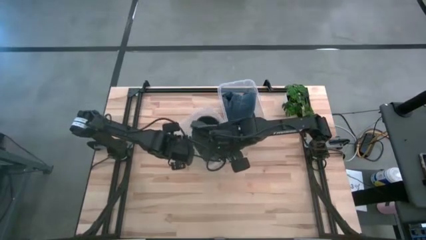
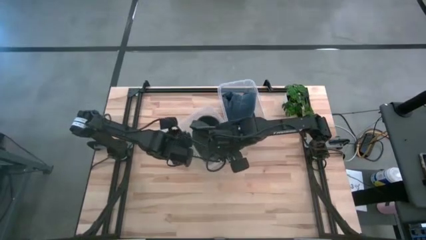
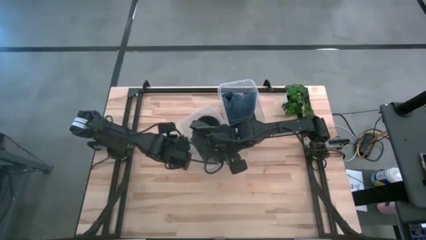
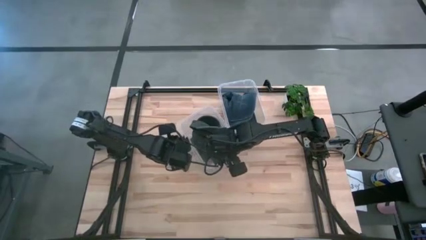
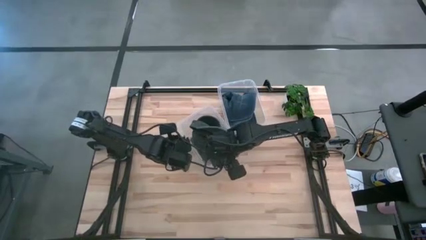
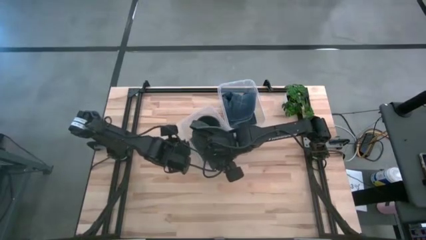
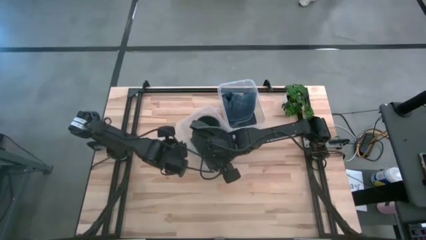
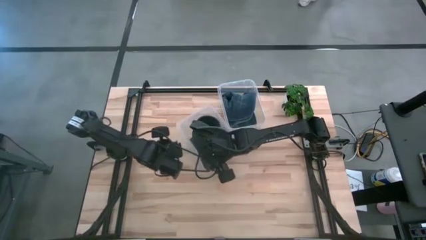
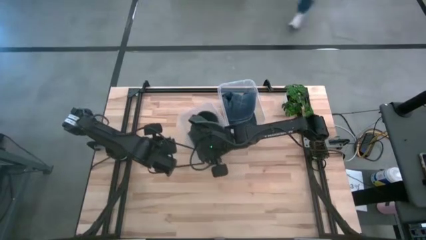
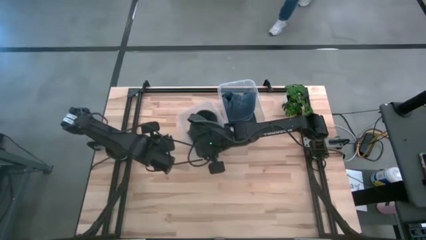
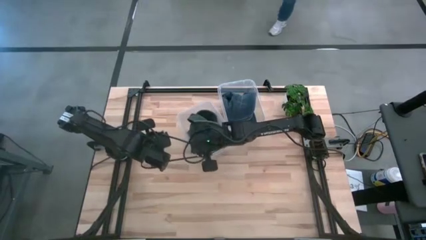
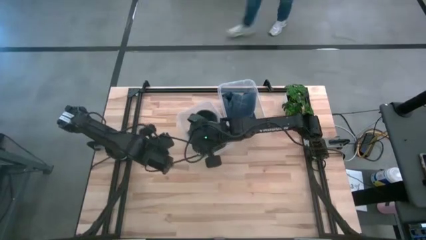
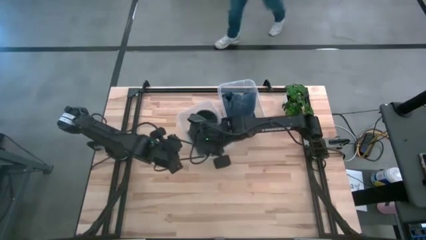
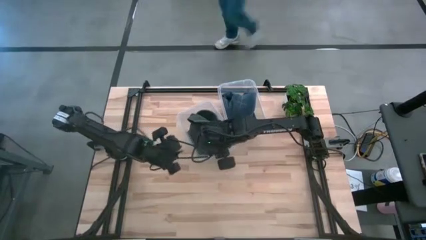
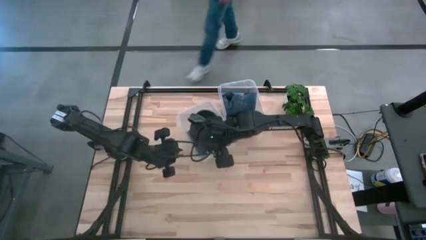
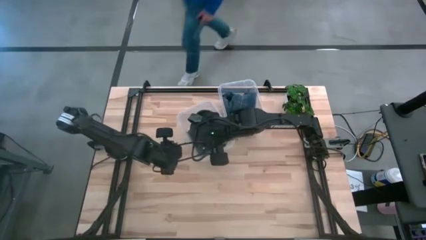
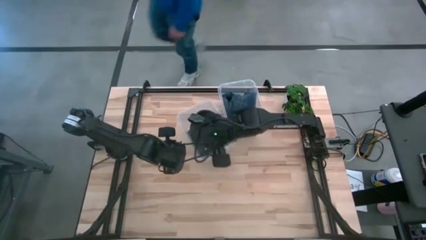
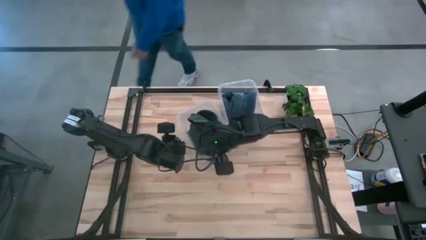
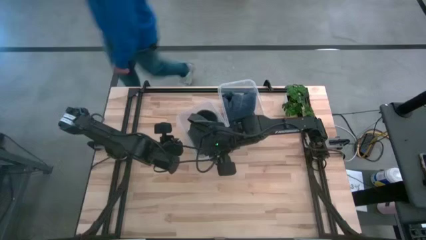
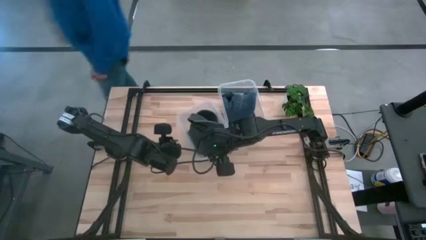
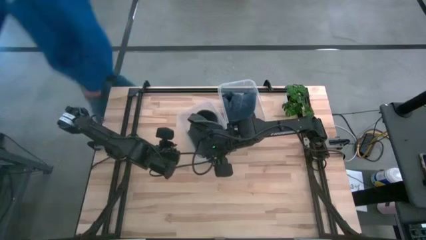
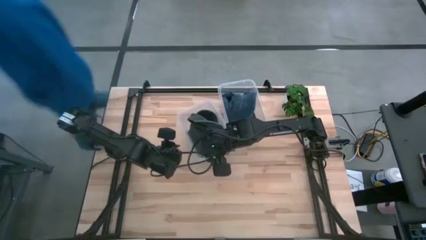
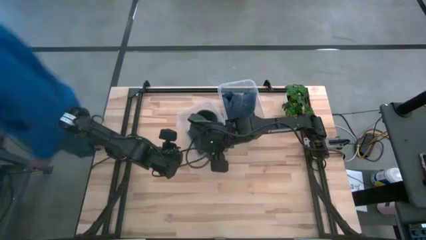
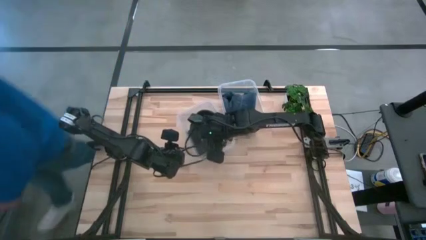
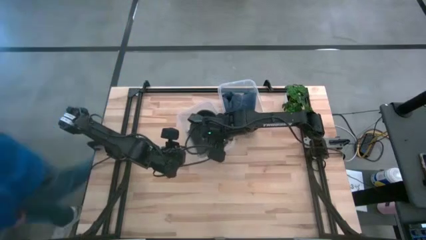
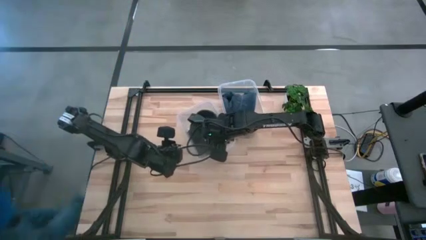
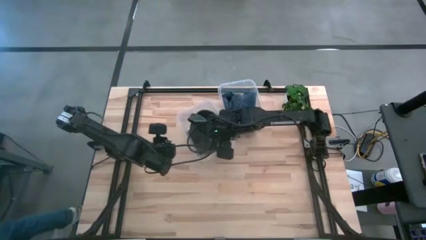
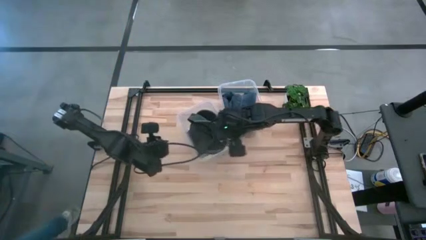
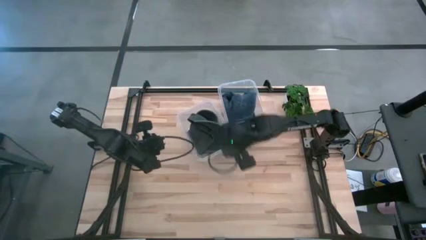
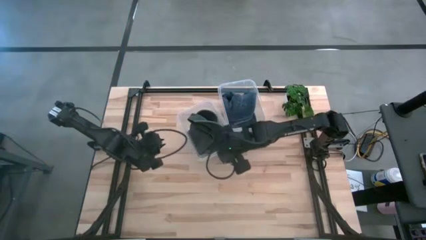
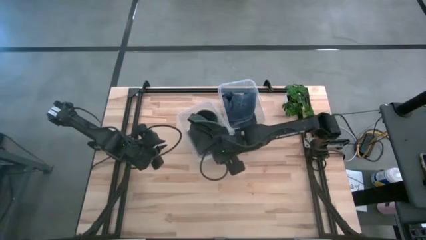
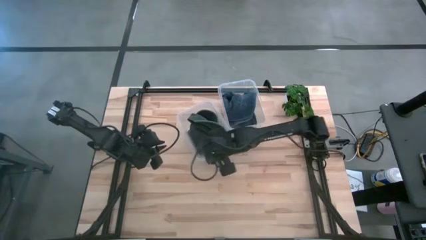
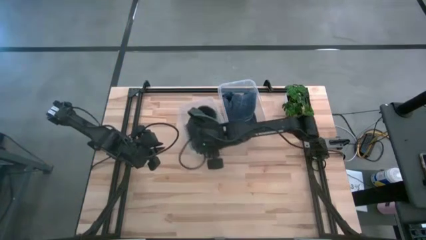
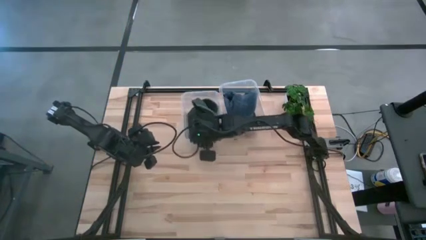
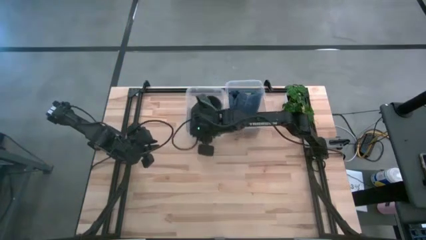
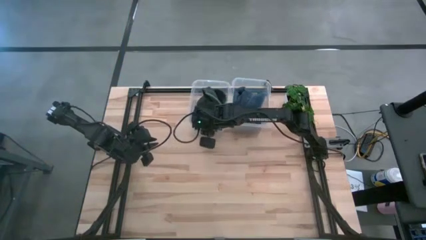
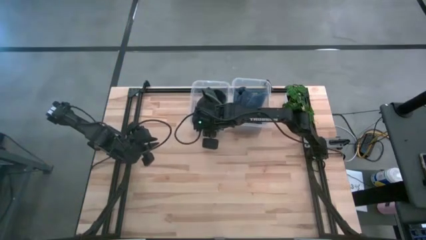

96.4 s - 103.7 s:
Task: Pick & Place hat
Adjust the left transparent bin on the table

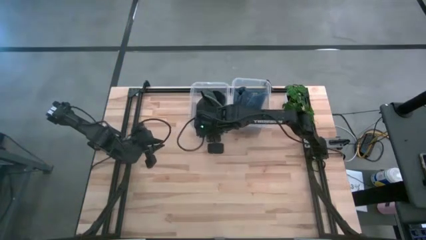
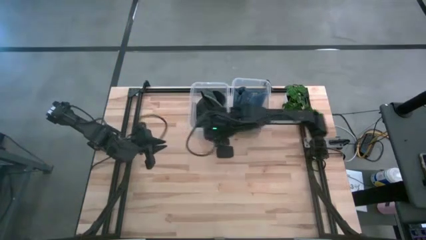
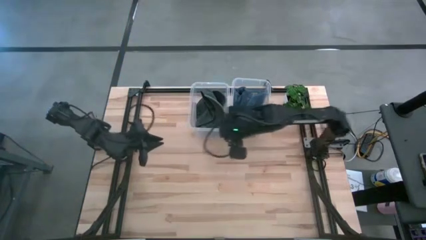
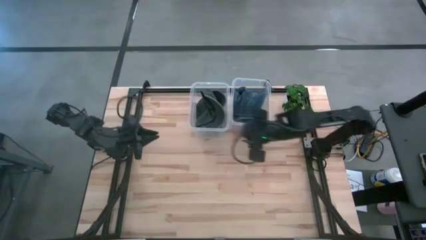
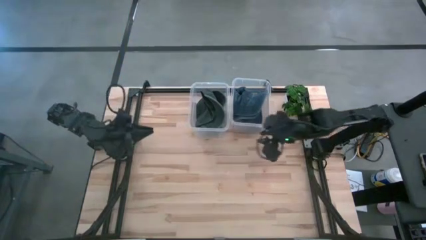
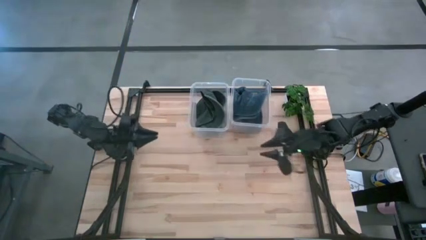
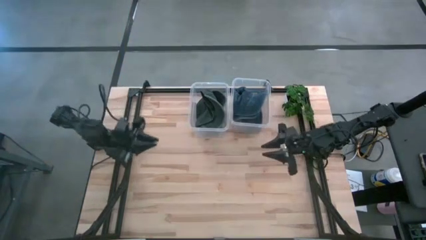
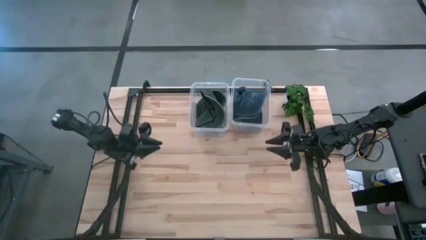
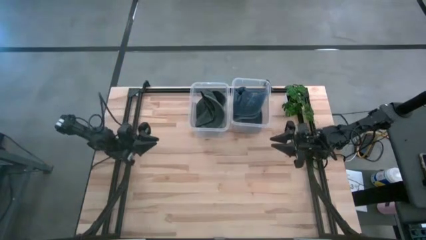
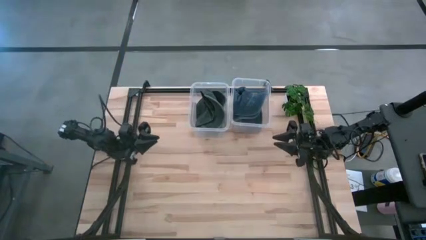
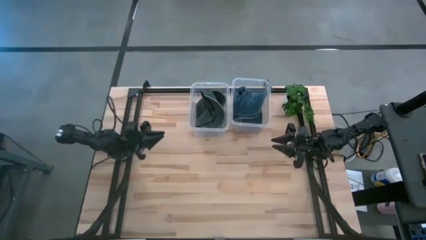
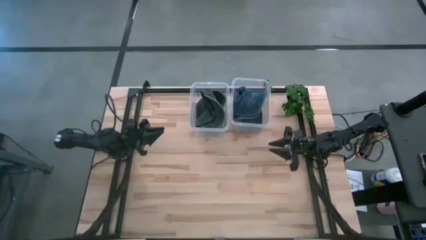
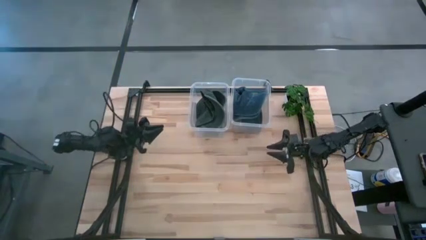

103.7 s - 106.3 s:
Return to Home Position

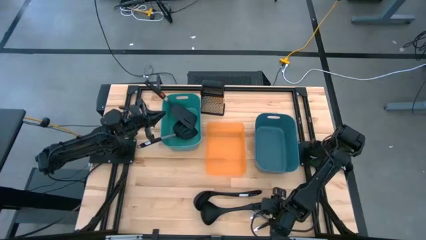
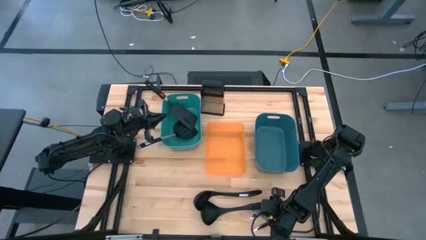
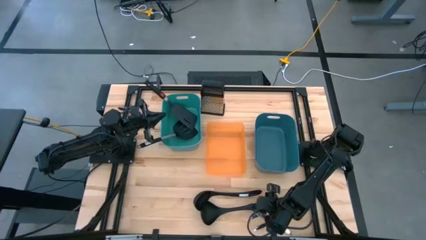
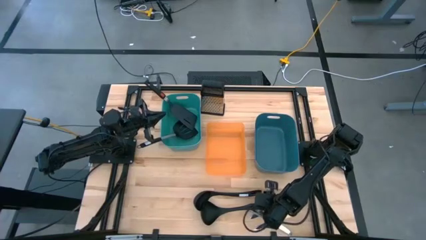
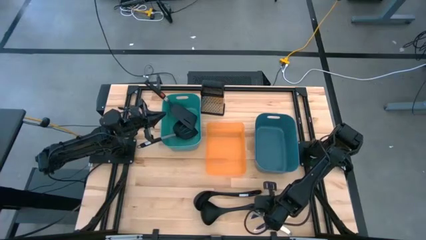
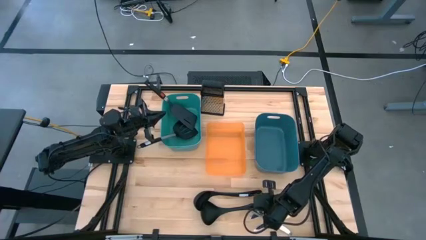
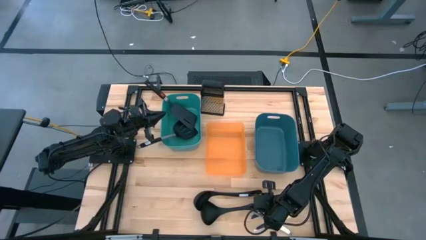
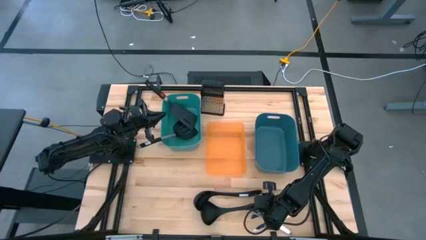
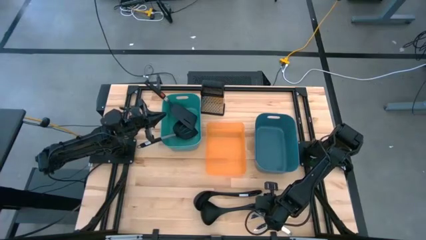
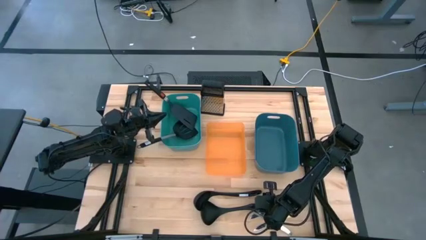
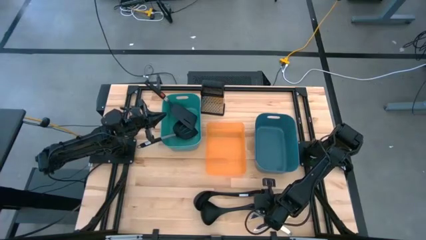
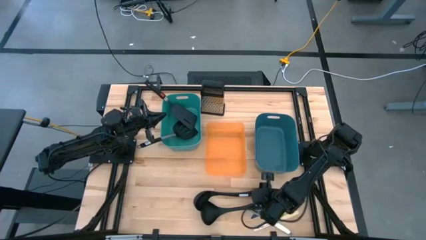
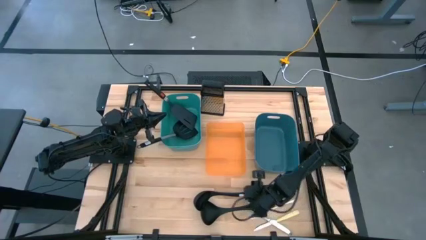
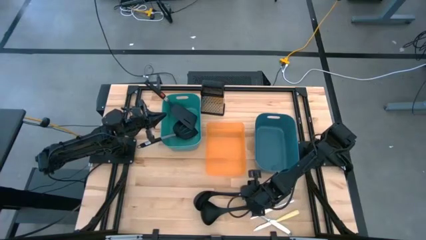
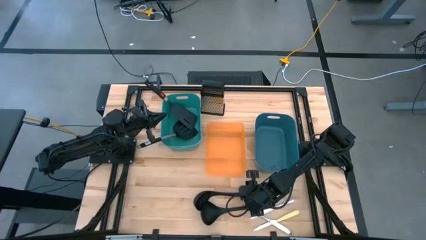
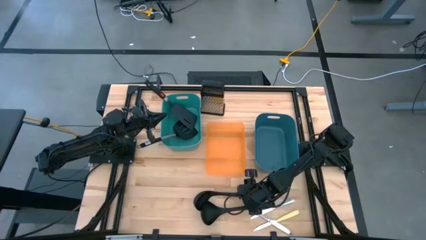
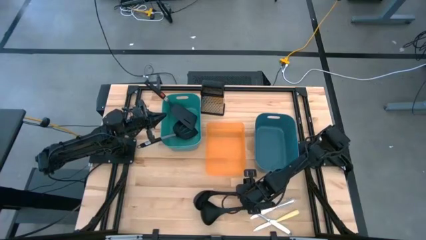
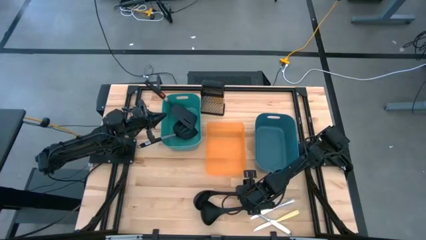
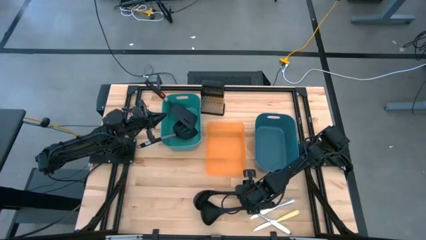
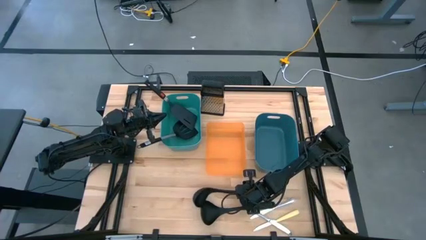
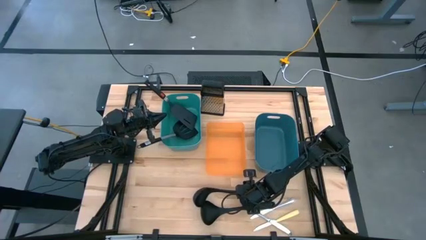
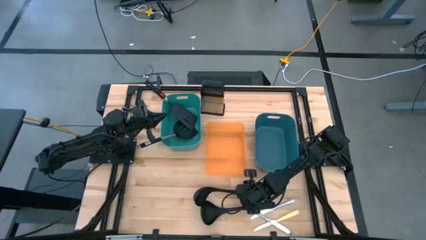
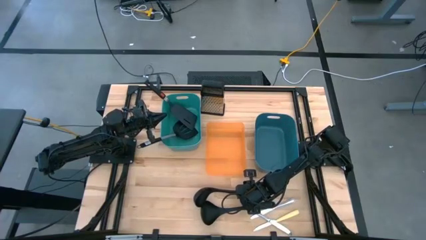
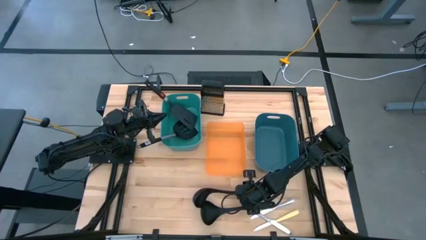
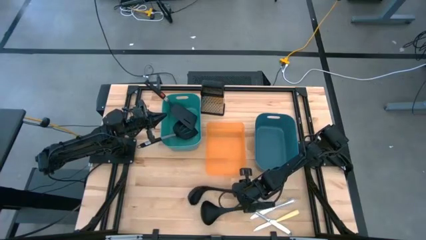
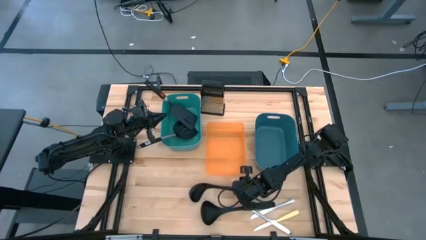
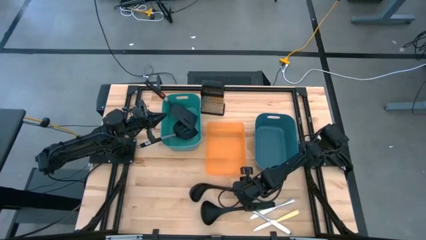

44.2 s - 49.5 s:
Task: Pick & Place Kitchen Items
Adjust the top black serving spoon

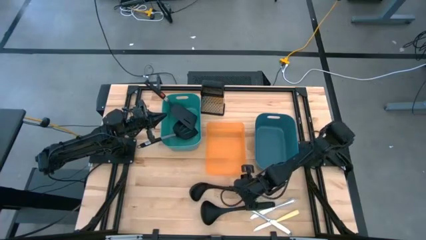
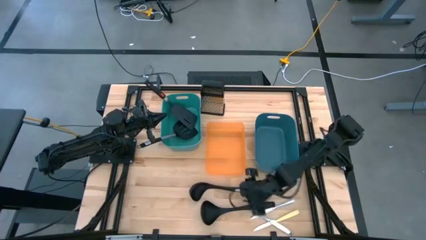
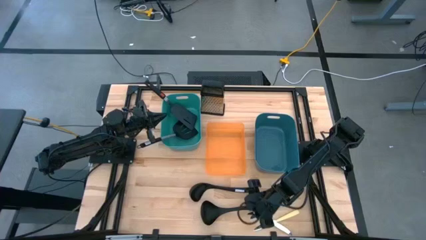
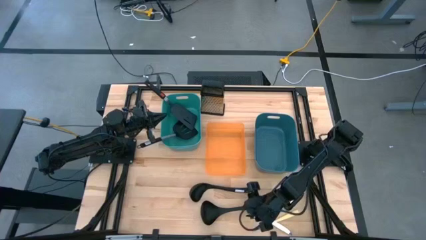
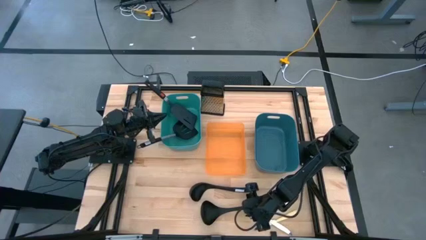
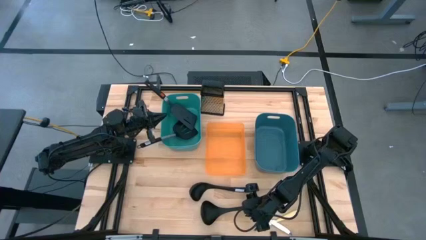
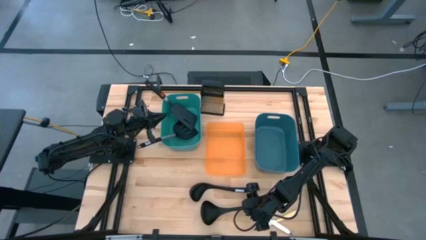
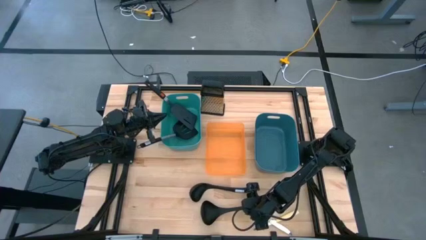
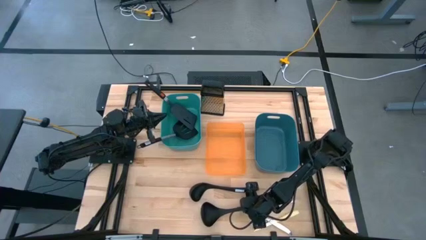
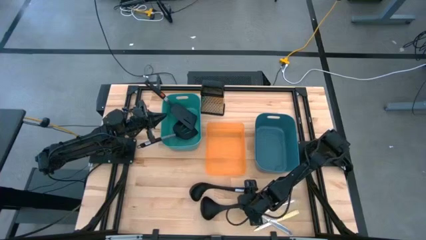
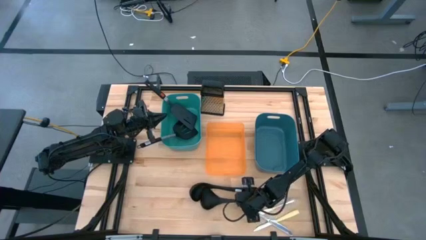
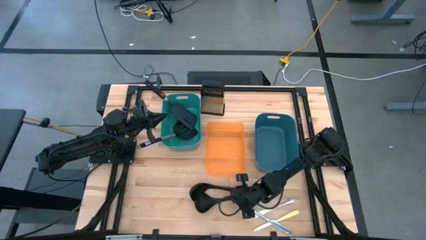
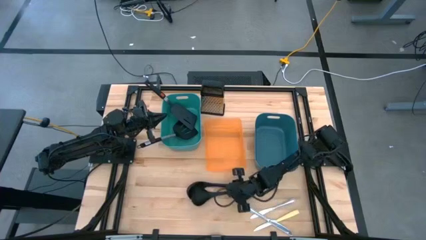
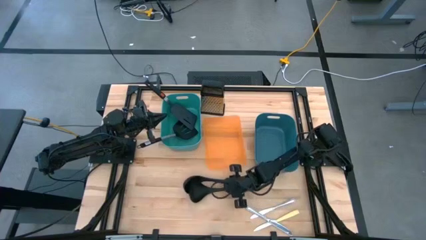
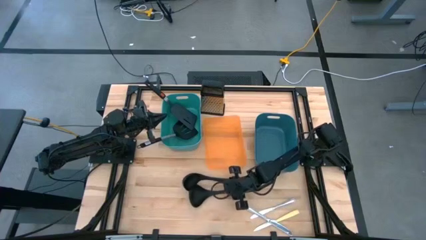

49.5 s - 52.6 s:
Adjust the bottom black serving spoon
